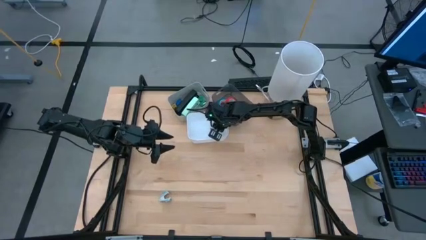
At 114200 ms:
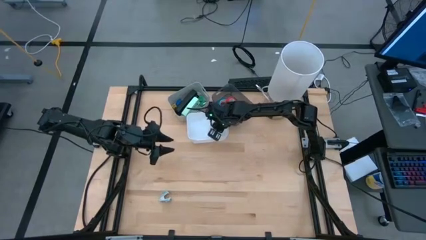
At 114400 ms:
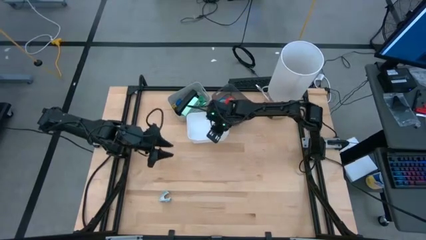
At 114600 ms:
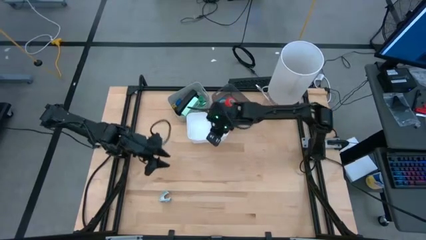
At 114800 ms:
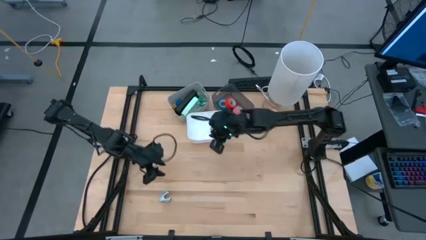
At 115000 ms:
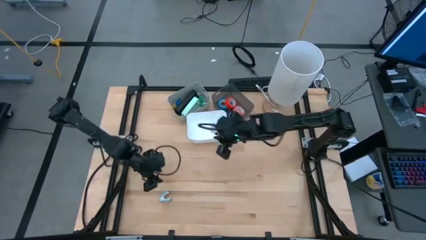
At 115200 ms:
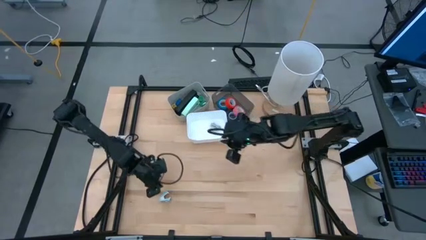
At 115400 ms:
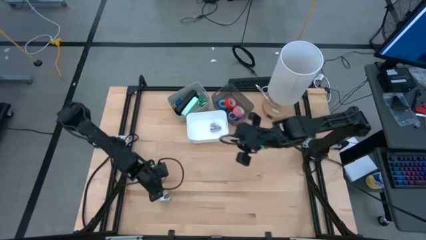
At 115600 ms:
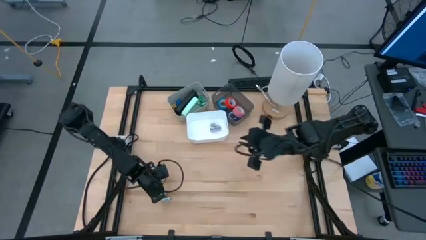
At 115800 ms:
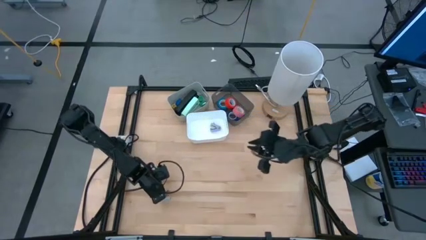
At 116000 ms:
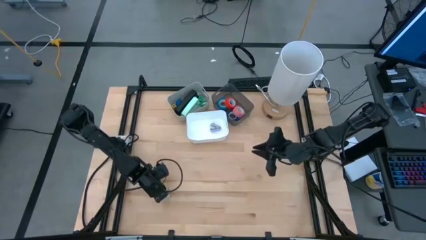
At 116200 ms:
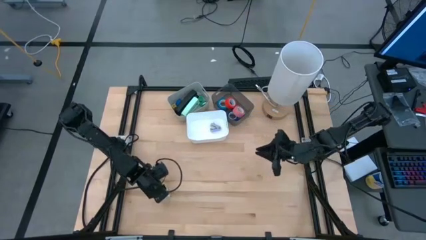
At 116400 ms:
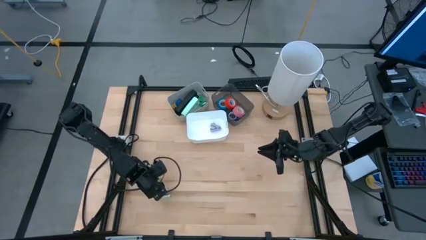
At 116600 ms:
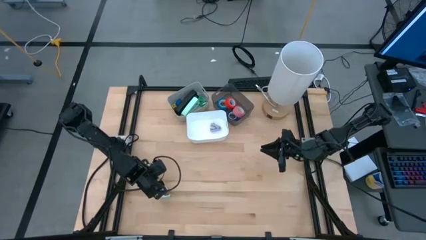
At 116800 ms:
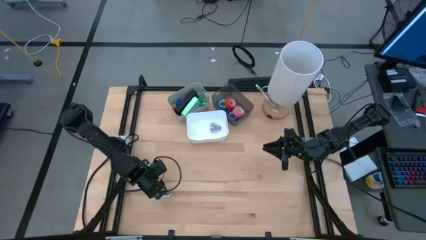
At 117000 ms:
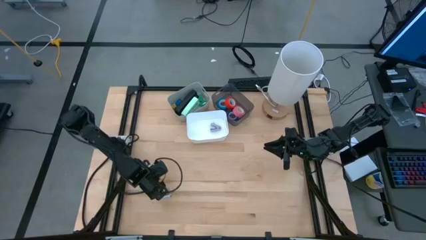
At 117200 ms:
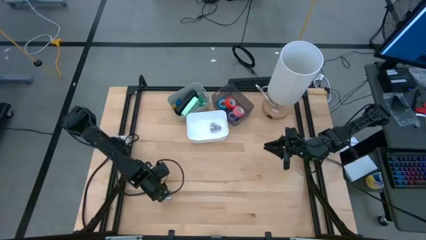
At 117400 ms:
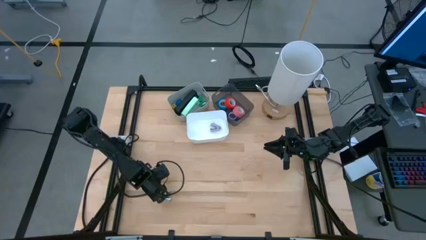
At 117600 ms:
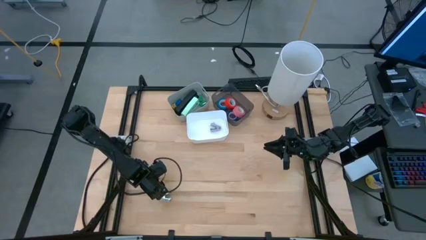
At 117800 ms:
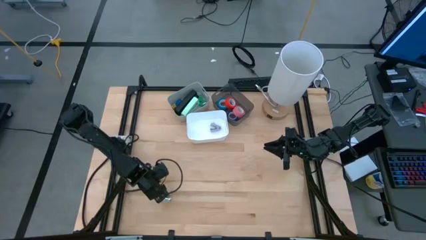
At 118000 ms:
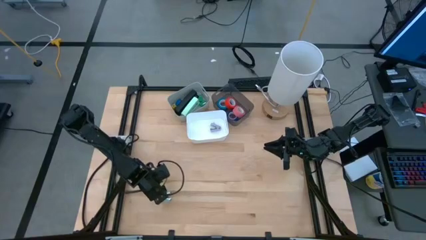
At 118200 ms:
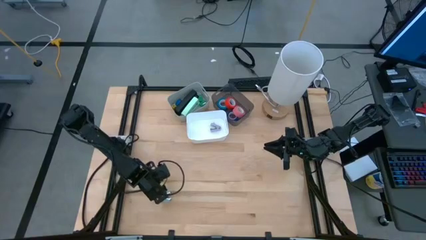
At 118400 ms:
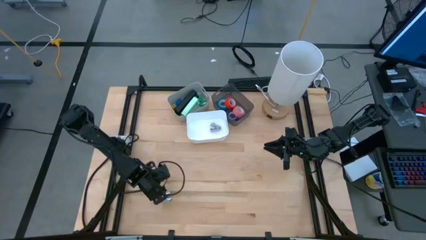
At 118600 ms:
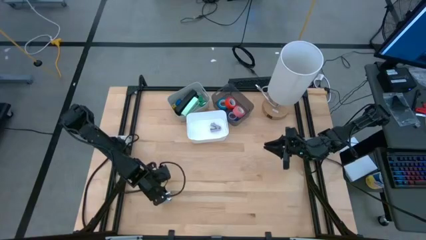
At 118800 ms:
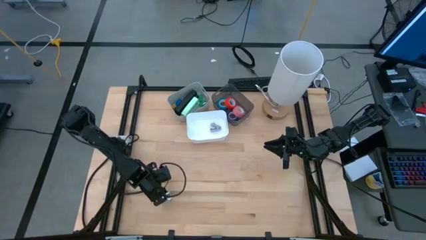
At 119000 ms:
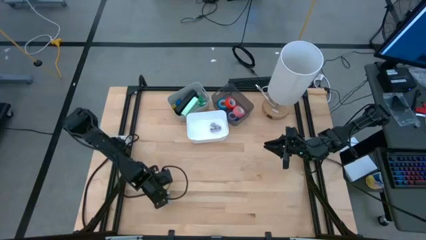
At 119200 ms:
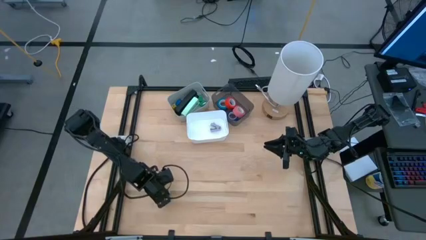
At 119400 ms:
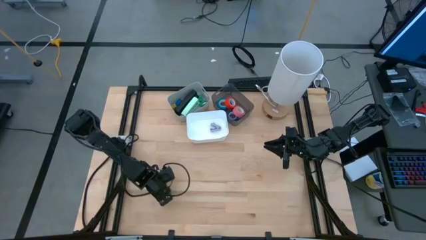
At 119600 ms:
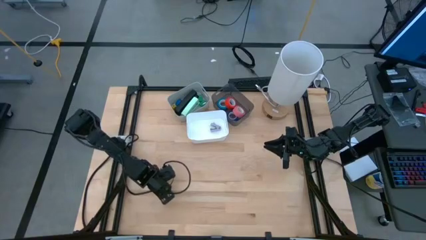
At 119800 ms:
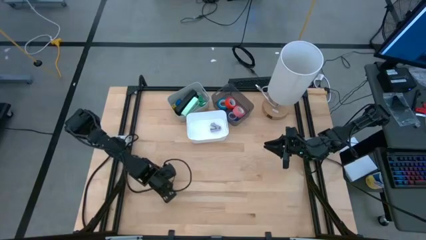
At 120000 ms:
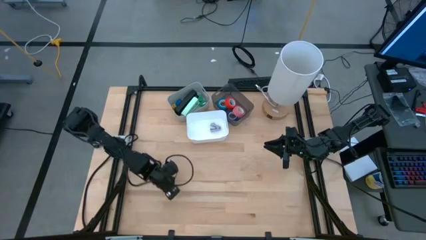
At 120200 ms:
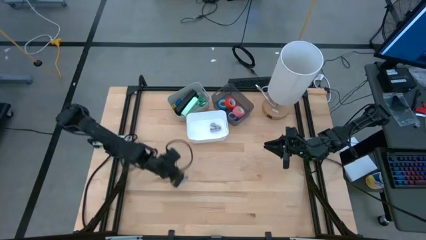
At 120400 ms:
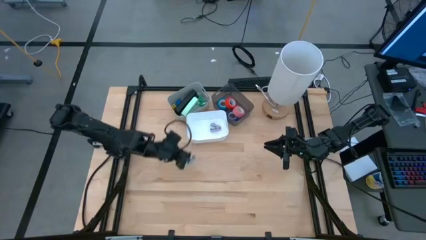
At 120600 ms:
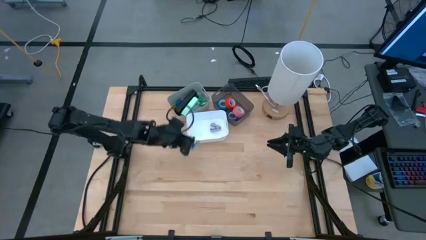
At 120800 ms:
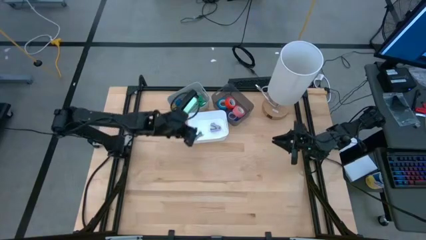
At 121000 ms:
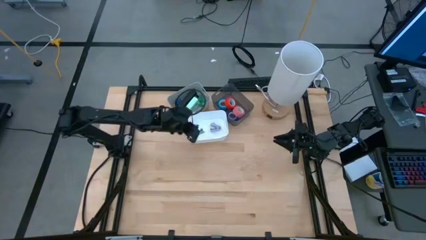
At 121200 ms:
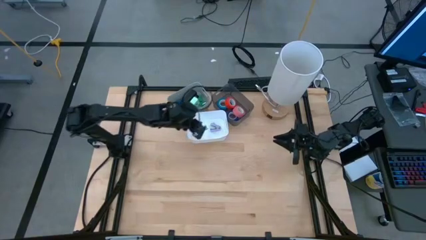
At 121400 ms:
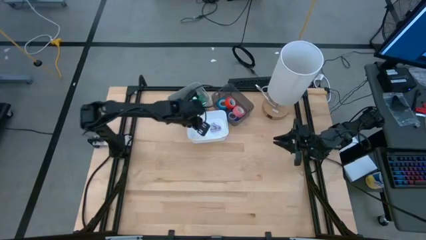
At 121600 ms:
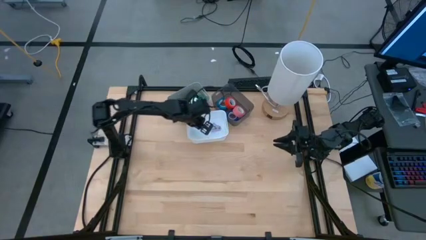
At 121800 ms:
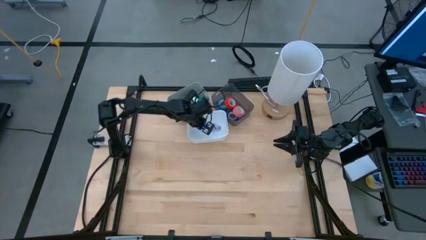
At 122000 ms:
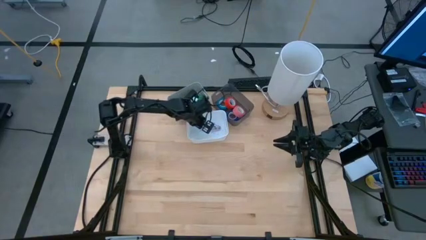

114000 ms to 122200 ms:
Task: Pick and place Stapler, Stapler remover, tape
Put the light blue staple remover into the white bin

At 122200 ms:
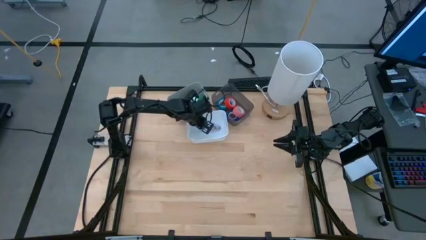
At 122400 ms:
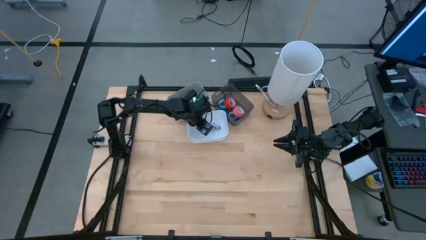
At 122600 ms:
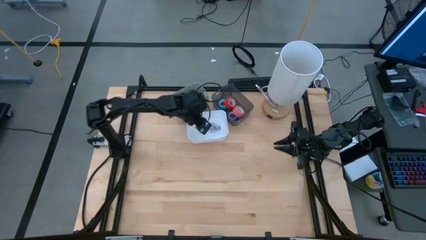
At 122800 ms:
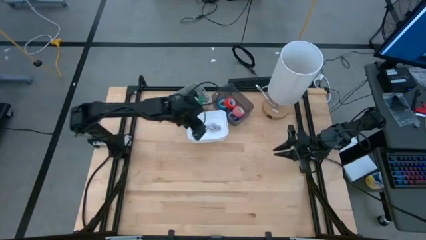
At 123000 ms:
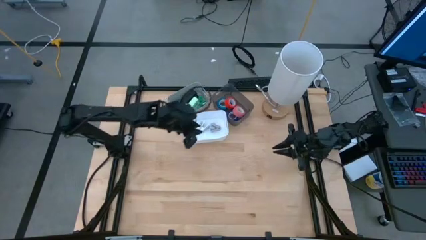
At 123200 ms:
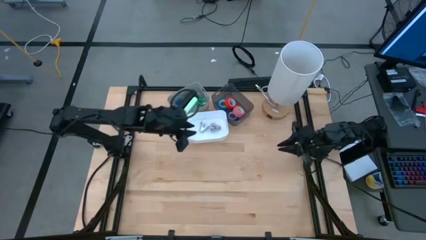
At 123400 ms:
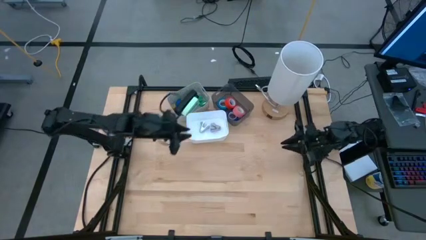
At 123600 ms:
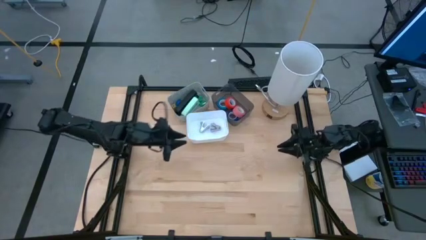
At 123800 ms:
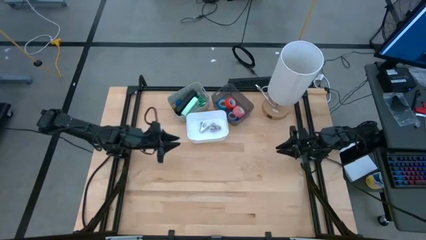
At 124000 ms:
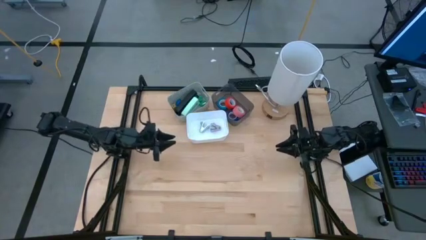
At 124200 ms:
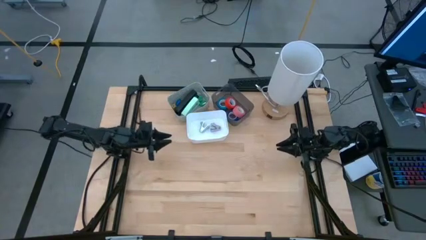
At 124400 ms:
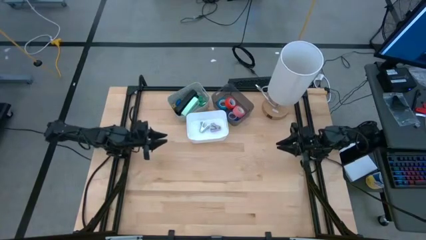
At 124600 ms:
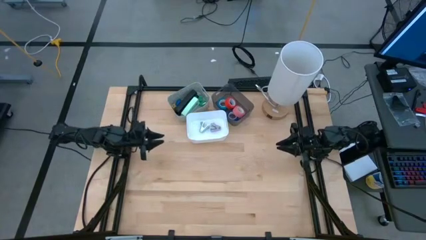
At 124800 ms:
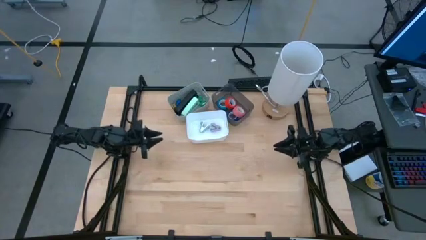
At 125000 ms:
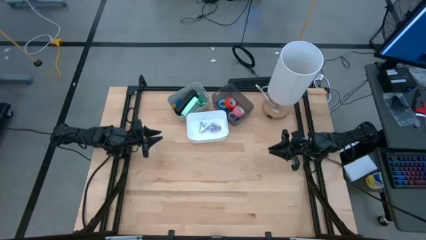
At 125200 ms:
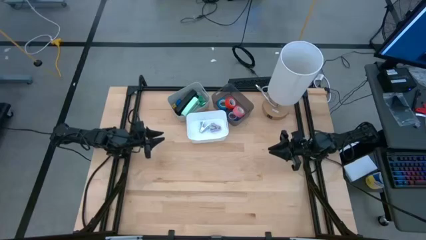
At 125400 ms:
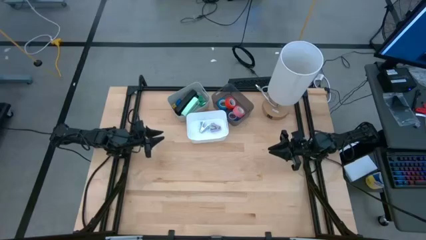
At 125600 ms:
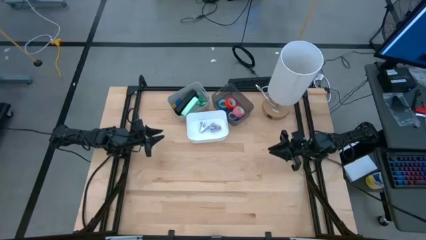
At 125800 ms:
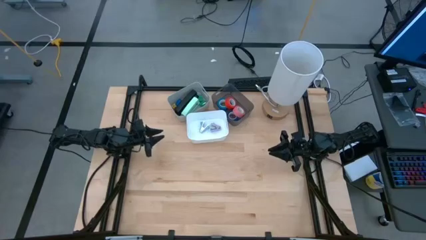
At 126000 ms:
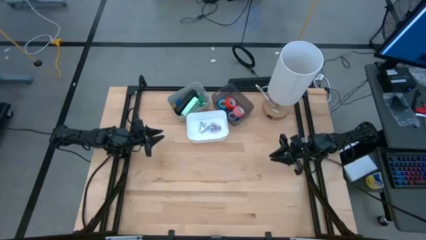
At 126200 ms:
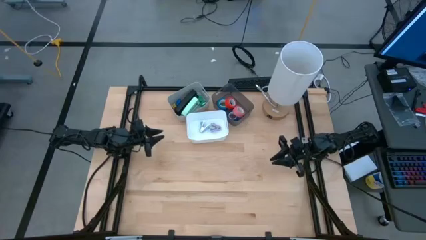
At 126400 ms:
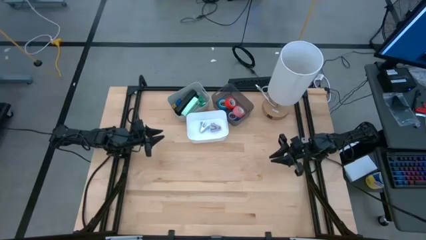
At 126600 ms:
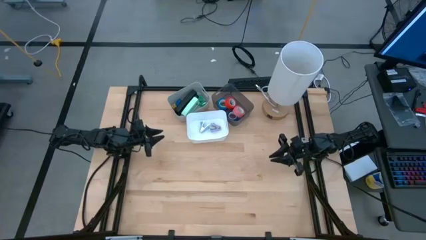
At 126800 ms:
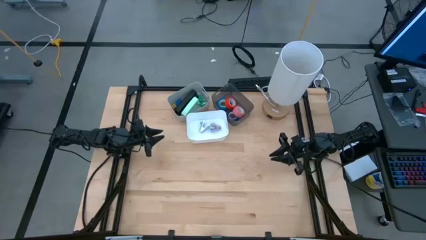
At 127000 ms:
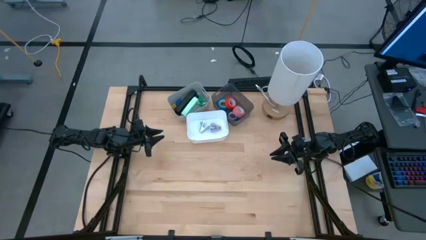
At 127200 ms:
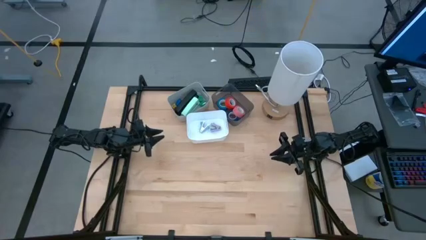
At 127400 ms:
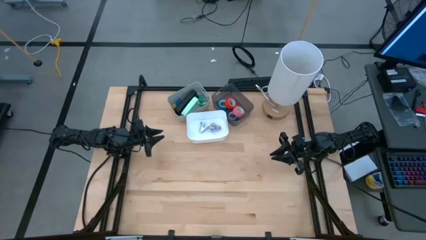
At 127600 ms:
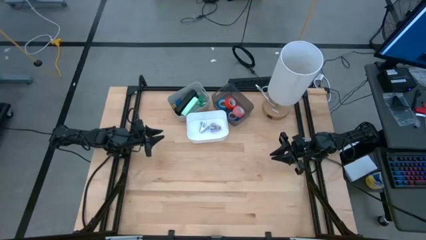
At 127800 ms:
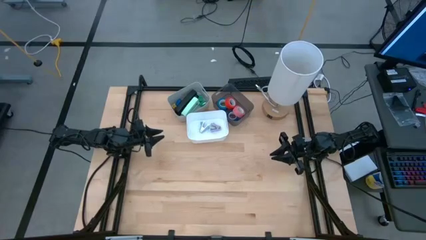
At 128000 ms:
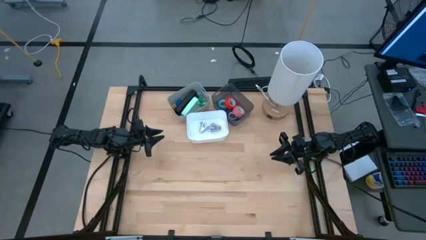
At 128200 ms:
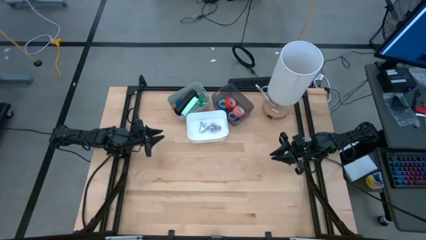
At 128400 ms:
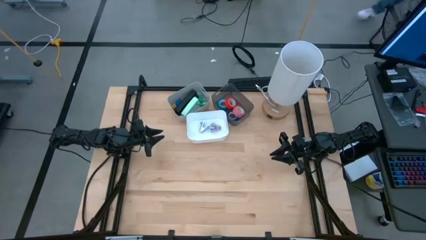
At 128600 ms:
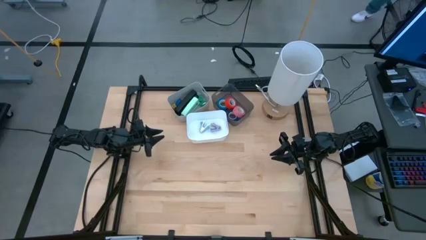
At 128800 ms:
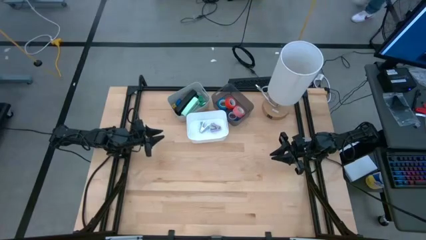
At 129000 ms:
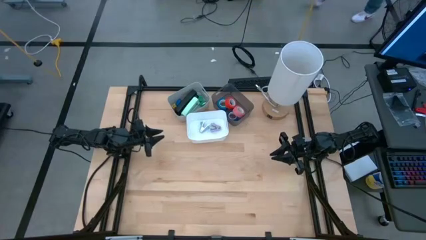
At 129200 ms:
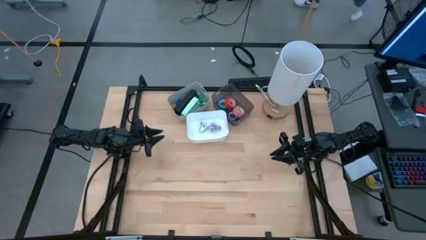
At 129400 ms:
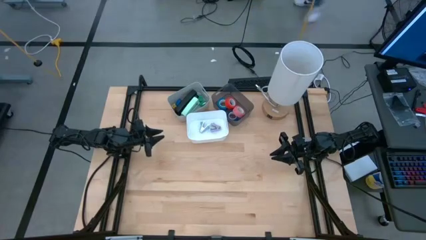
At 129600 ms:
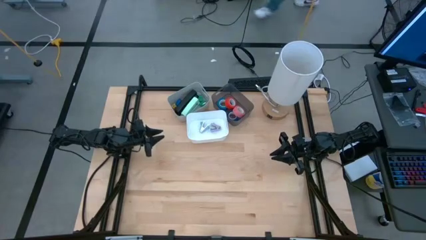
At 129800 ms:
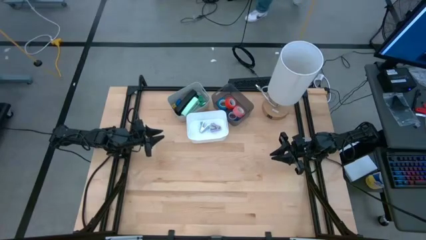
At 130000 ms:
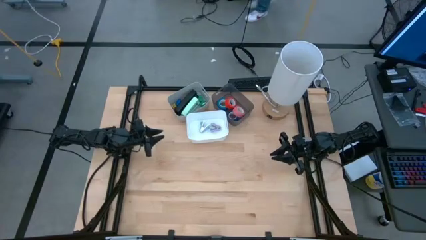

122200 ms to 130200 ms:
Return to Home Position

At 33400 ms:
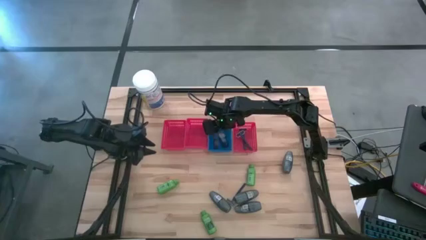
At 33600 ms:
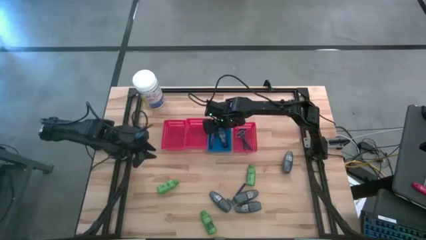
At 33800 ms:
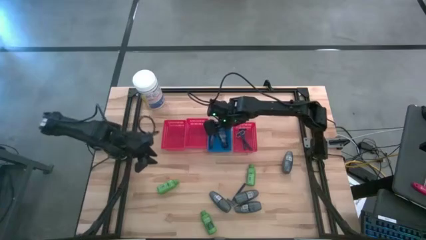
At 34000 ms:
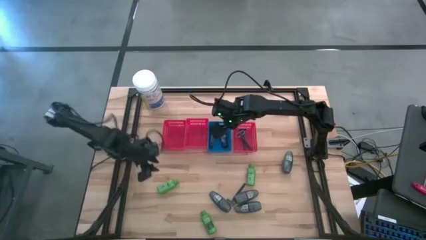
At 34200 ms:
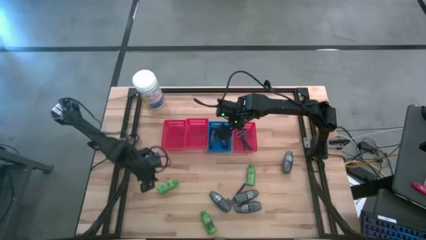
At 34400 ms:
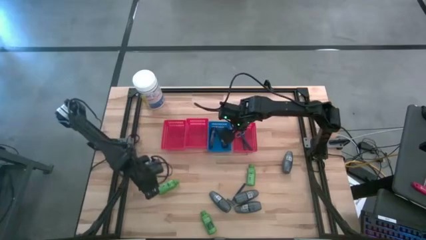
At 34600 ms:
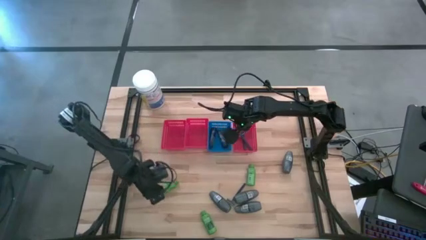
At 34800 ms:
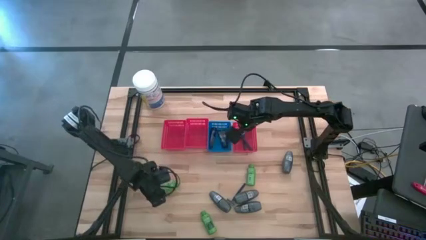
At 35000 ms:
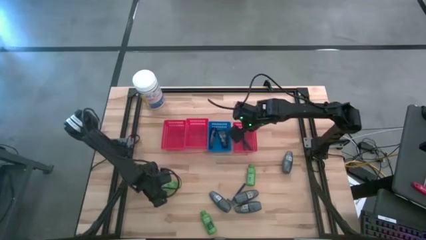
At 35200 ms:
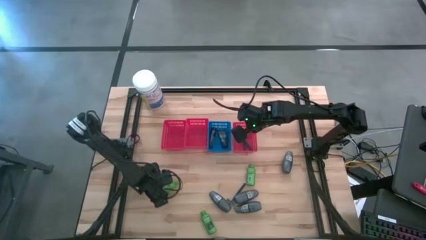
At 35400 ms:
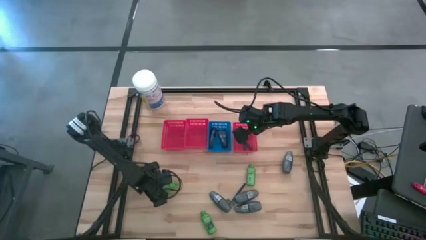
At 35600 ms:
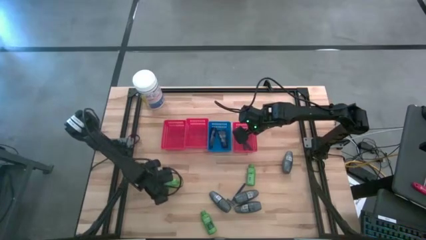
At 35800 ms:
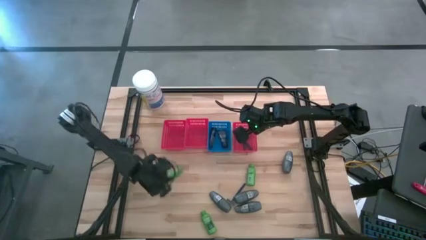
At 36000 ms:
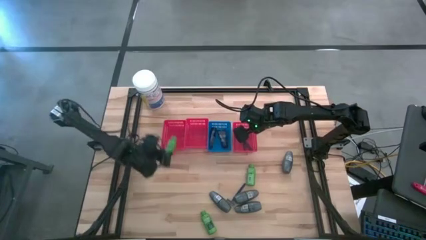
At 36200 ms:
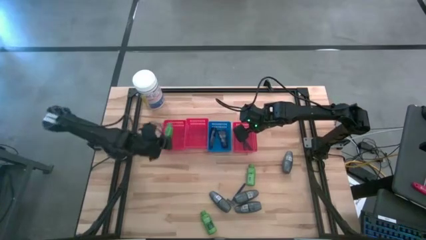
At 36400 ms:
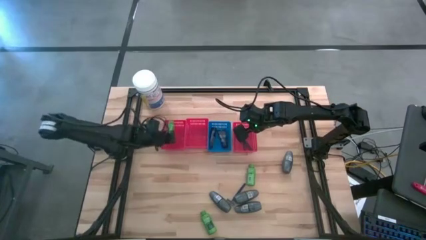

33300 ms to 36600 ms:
Task: Pick & Place Travel size toiletries
Put the green shampoo into the left red bin
